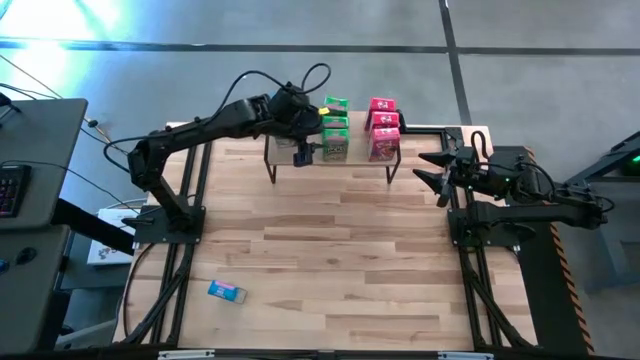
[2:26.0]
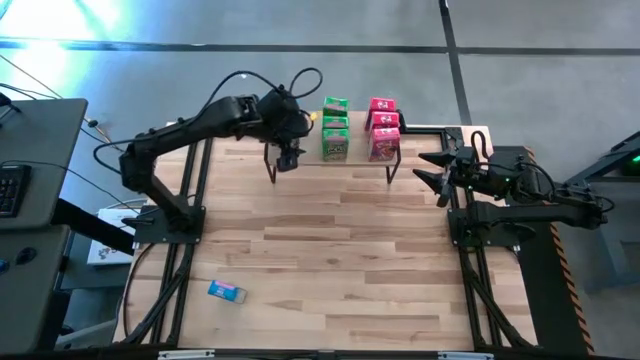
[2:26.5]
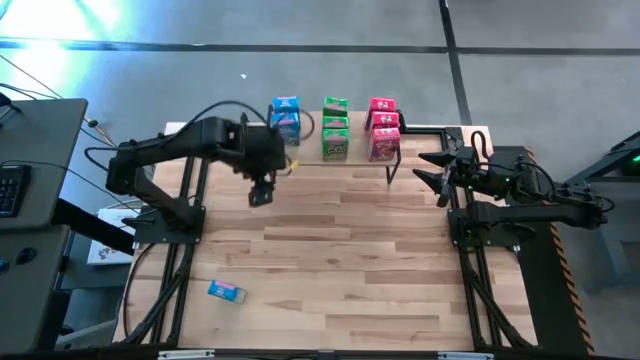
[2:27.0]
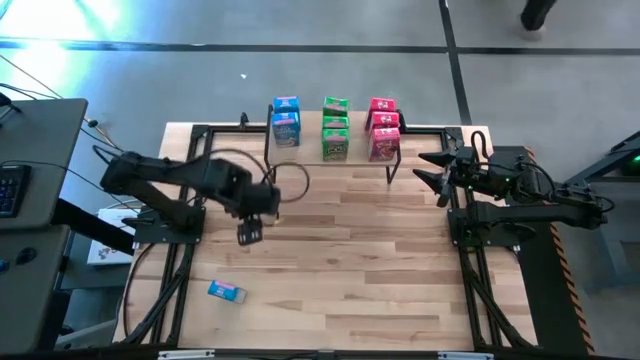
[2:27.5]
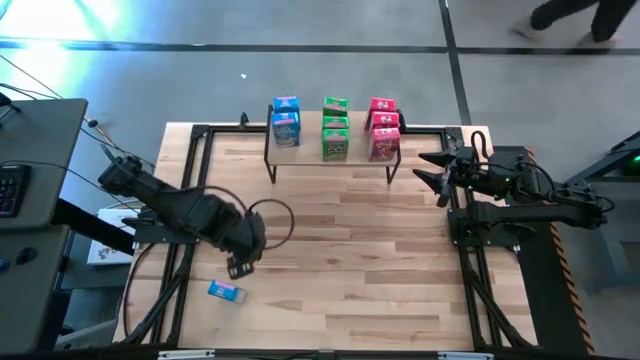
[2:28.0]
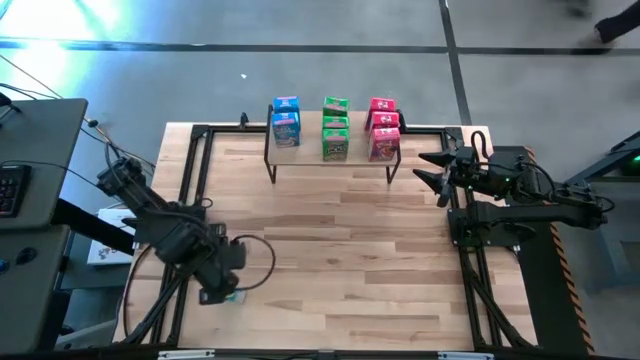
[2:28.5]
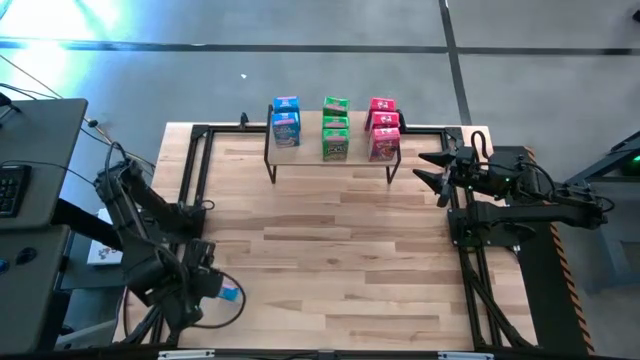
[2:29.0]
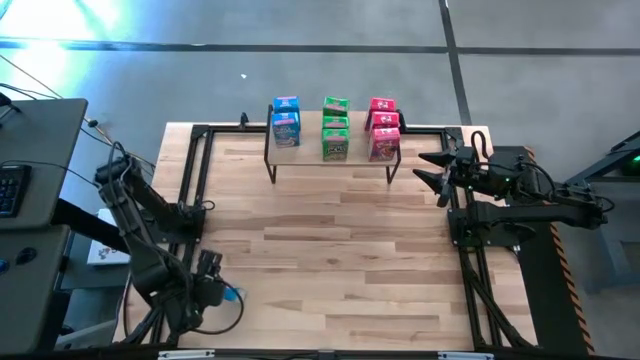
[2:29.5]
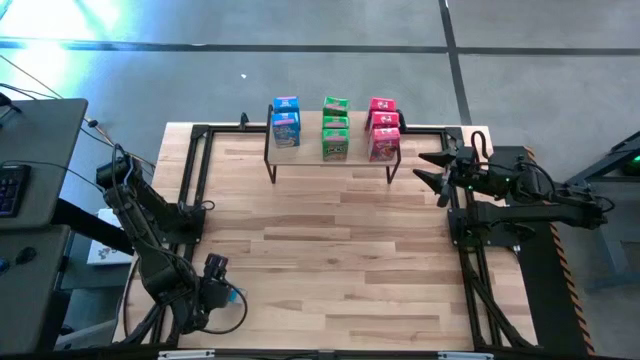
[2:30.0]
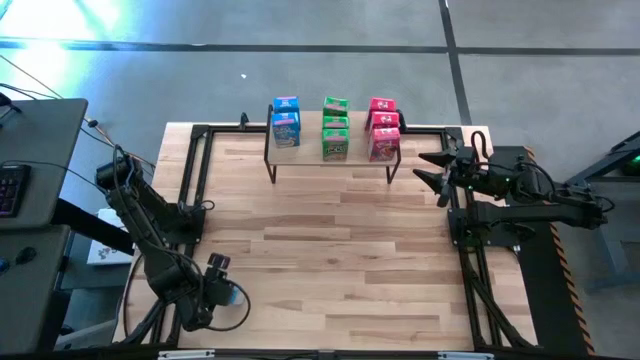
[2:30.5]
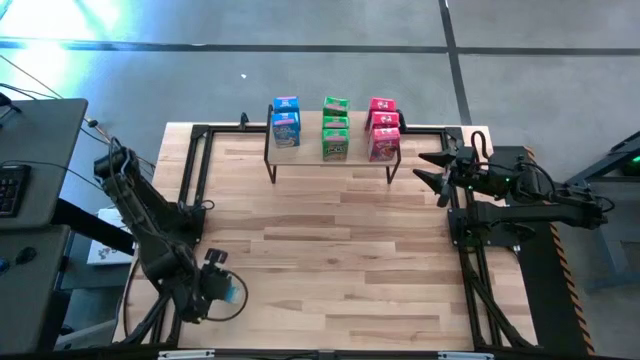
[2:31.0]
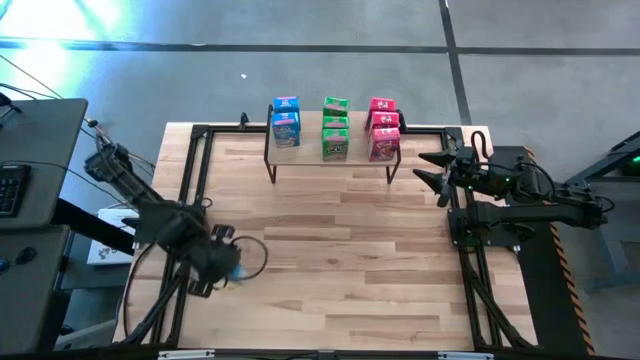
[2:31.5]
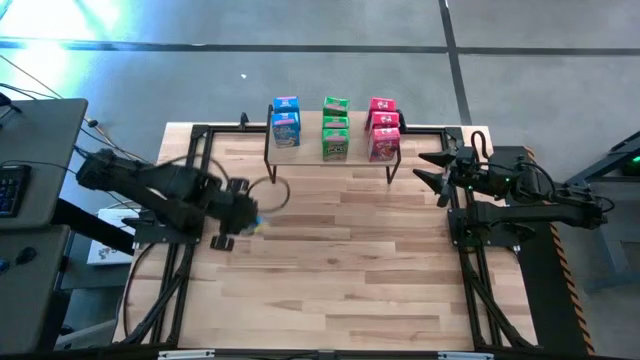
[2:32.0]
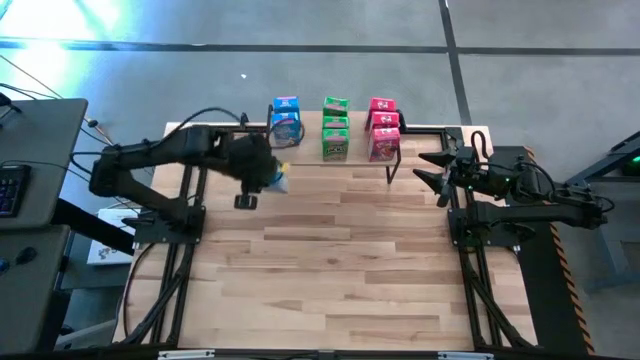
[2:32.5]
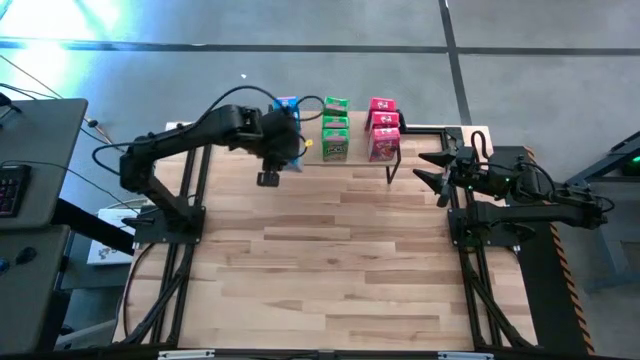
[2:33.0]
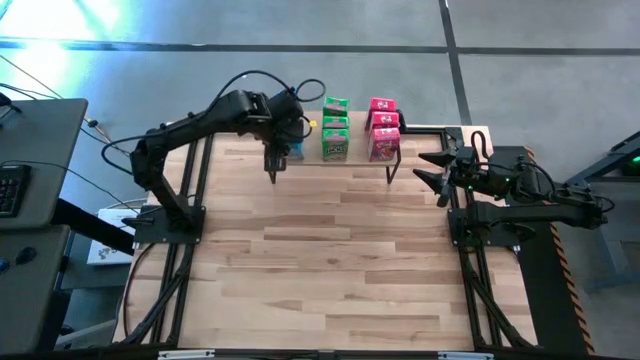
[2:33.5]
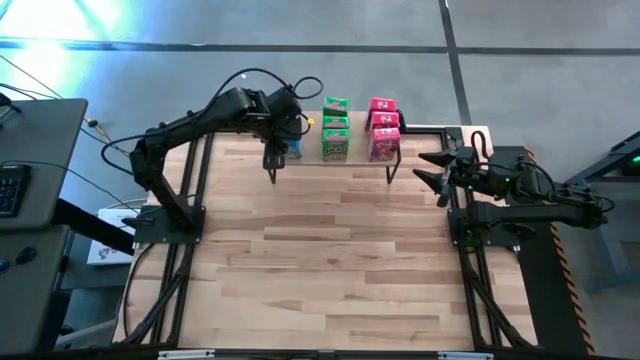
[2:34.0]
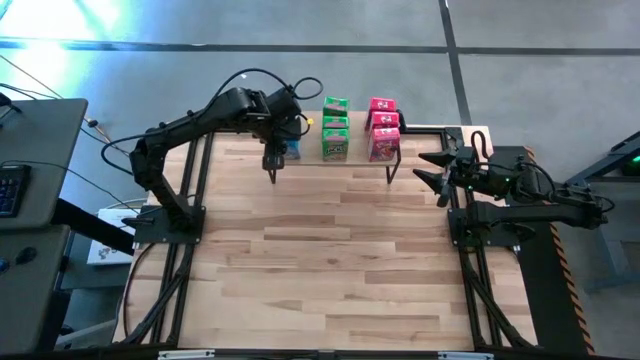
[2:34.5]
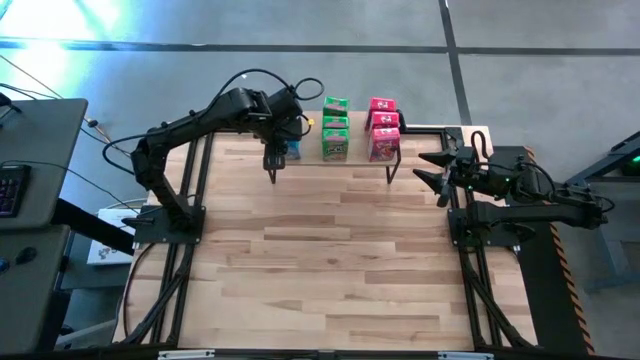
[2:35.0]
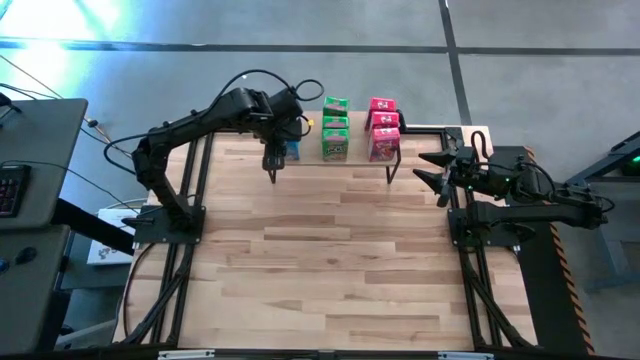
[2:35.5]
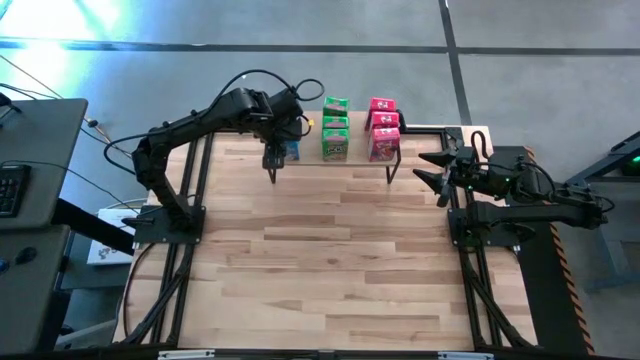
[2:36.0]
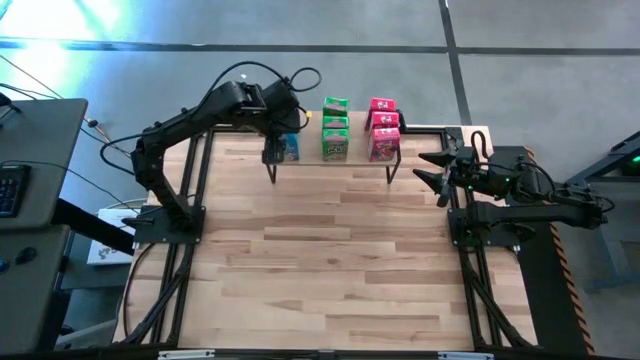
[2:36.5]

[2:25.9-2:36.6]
Task: Stack cereal on shelf
Put the blue cereal box aligned with the other blue cereal boxes on the shelf

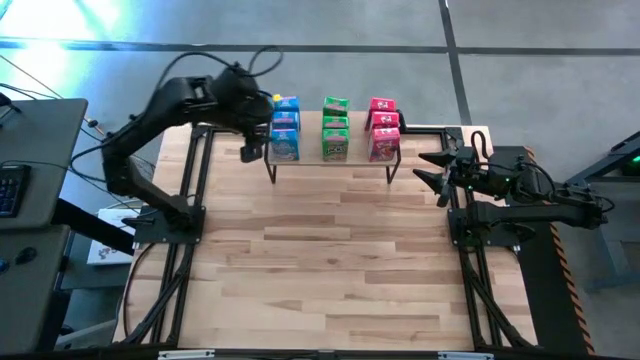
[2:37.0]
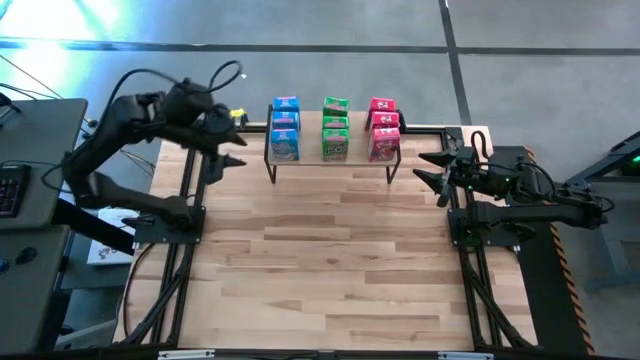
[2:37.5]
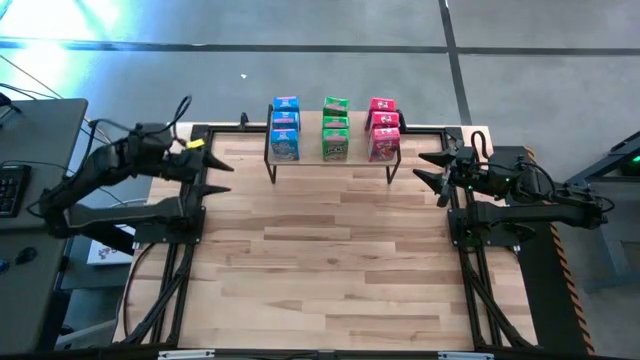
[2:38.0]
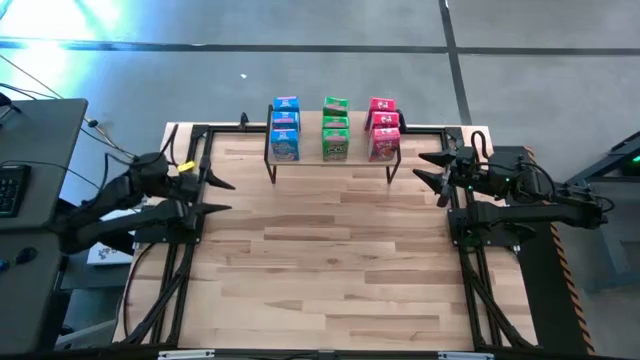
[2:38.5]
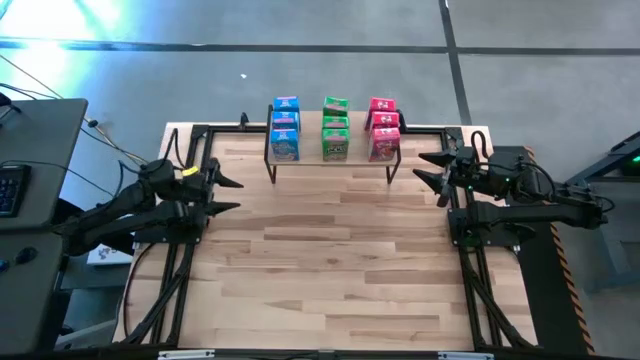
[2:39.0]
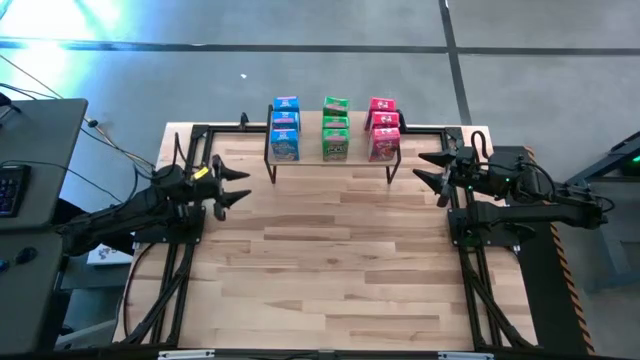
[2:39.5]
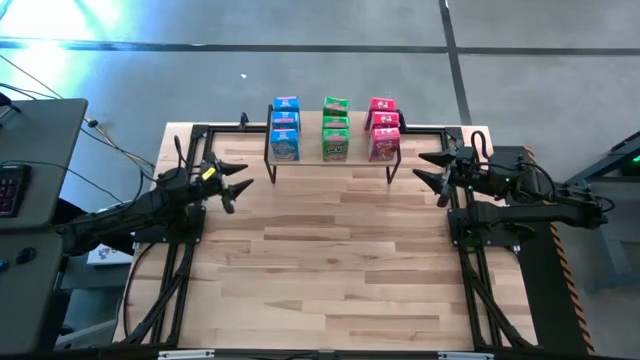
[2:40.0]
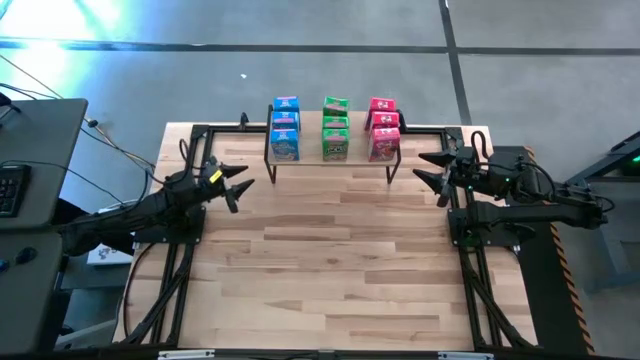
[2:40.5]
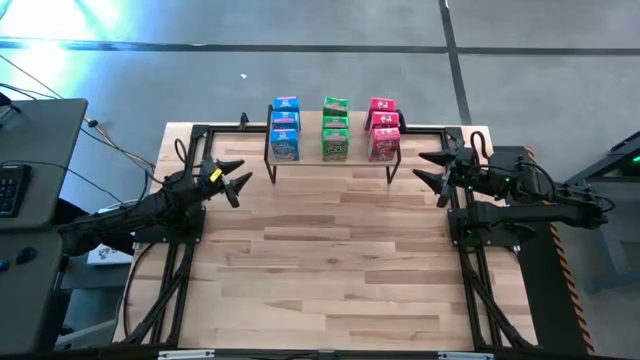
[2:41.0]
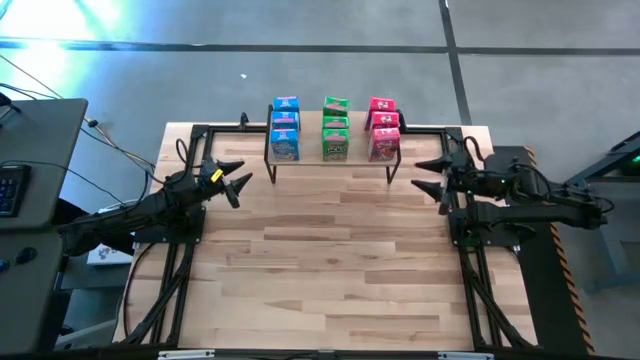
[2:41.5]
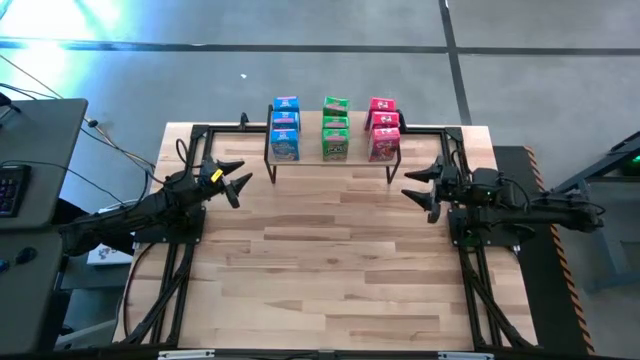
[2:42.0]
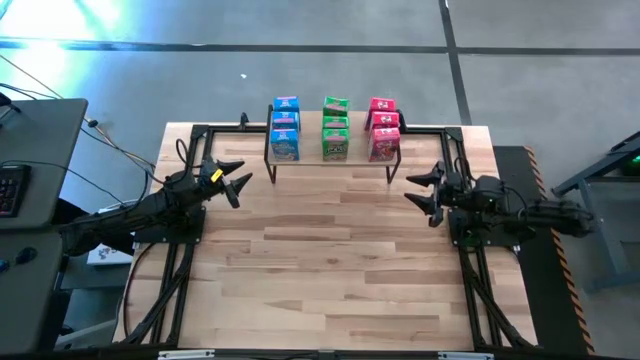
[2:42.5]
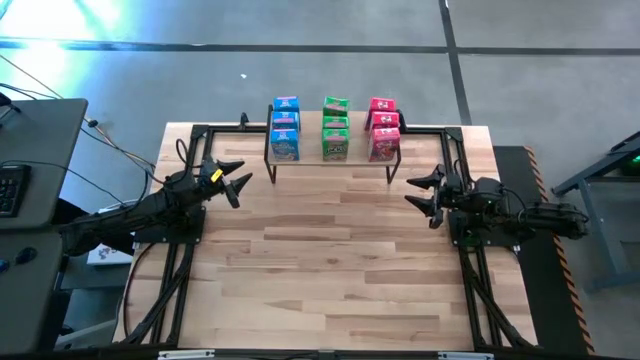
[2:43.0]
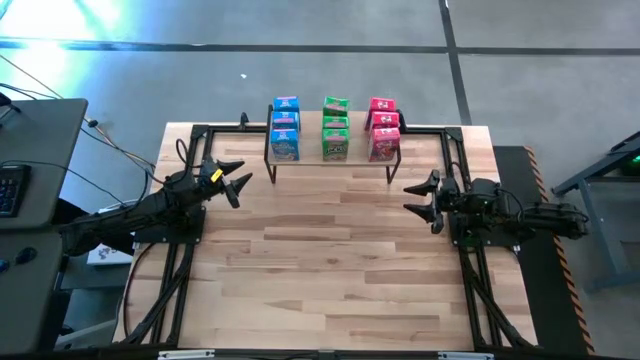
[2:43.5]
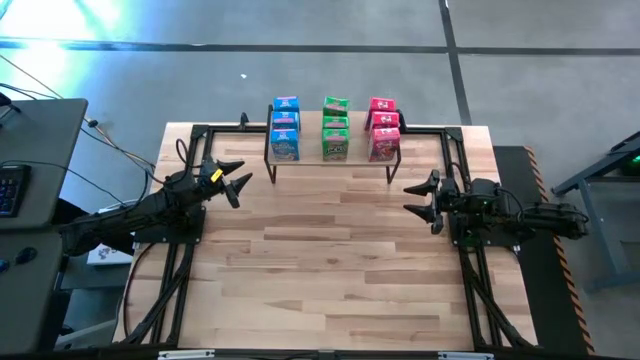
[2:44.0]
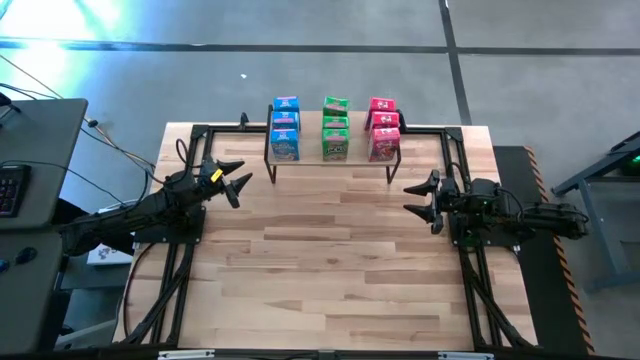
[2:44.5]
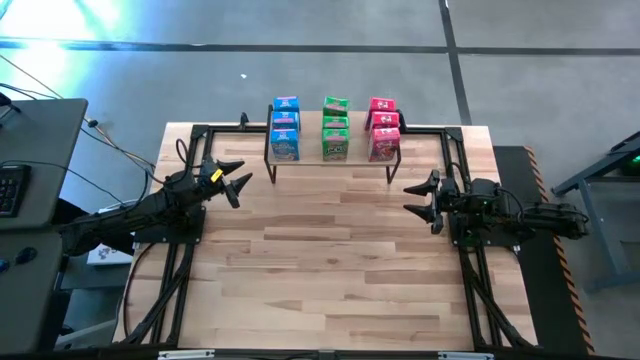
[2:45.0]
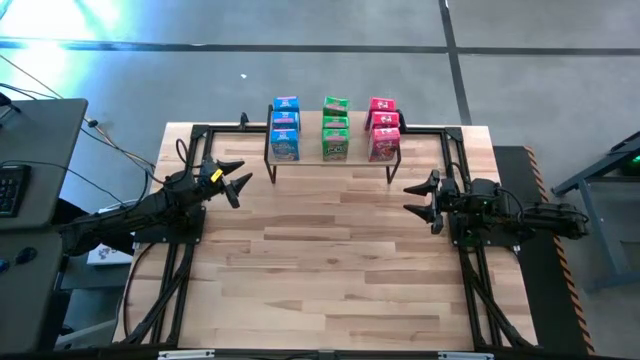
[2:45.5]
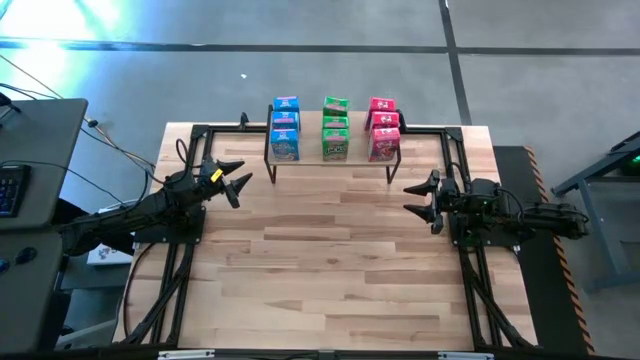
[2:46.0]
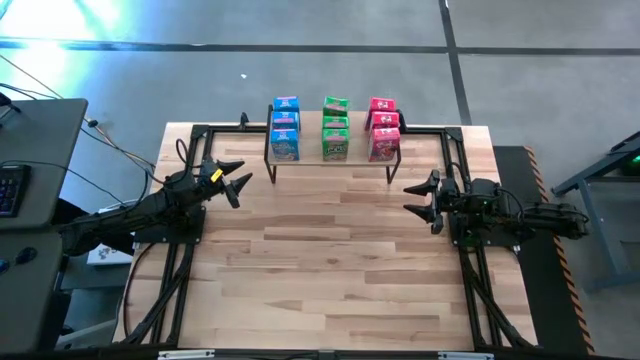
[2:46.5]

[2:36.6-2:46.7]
Return to Home Position
